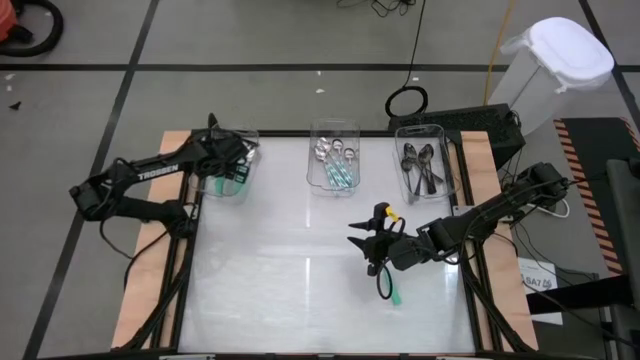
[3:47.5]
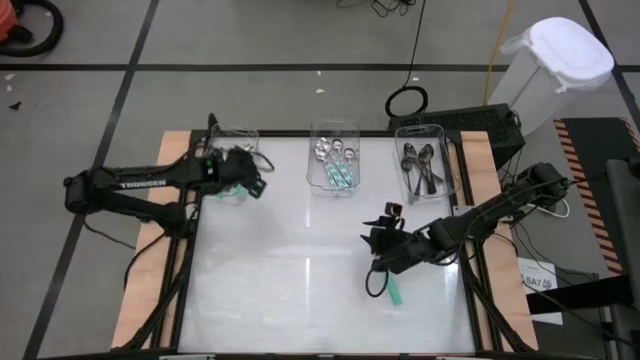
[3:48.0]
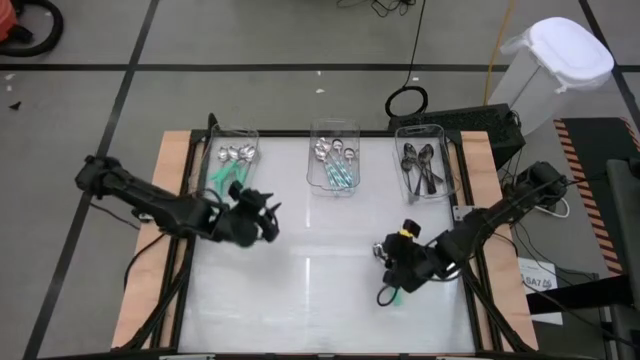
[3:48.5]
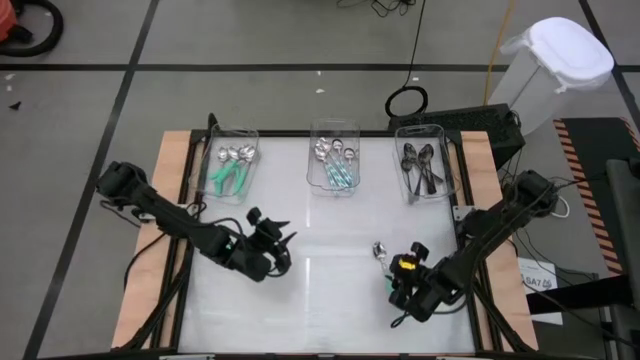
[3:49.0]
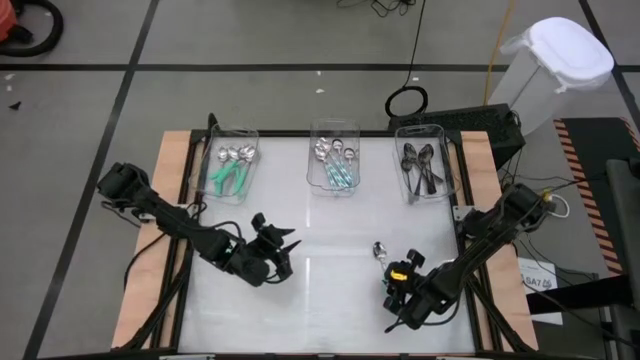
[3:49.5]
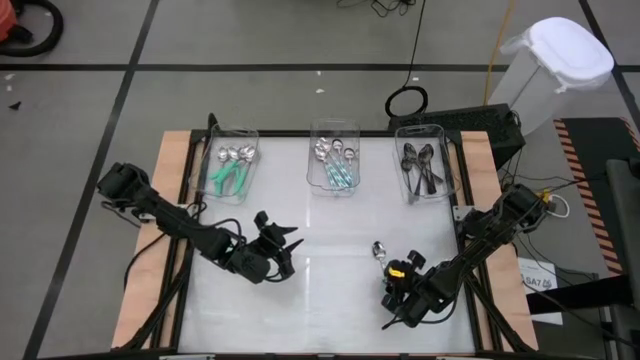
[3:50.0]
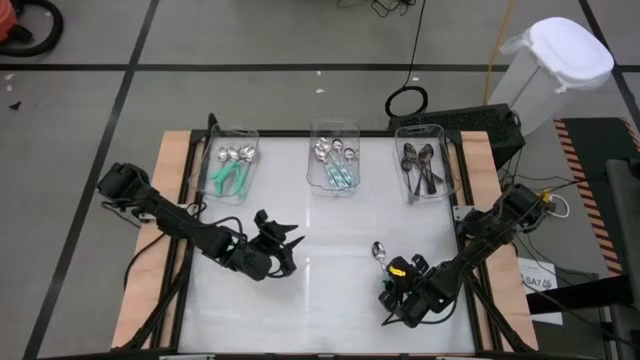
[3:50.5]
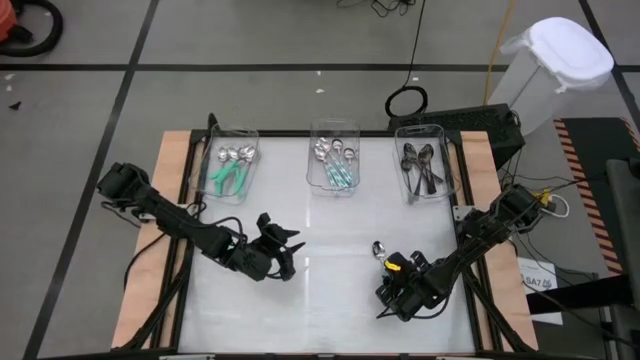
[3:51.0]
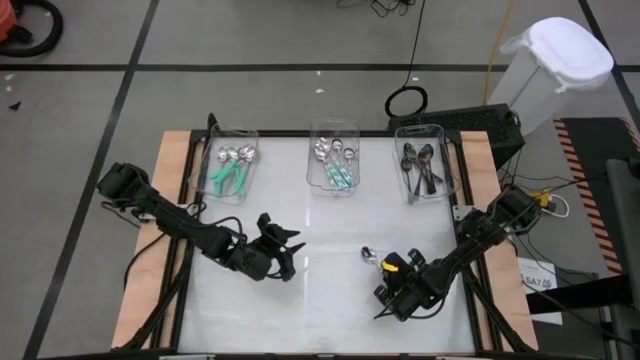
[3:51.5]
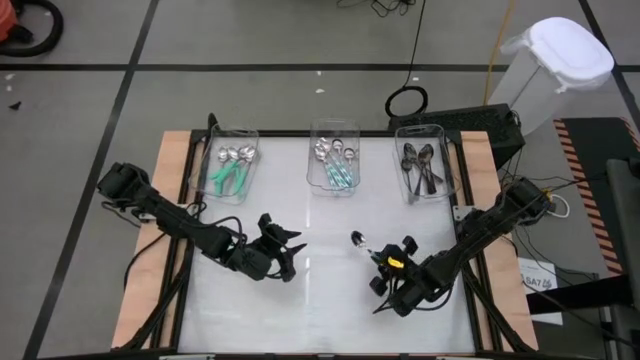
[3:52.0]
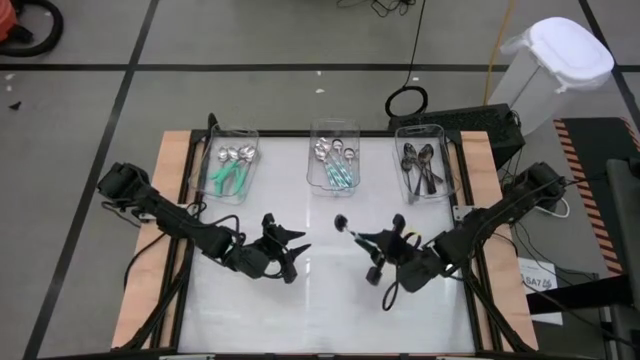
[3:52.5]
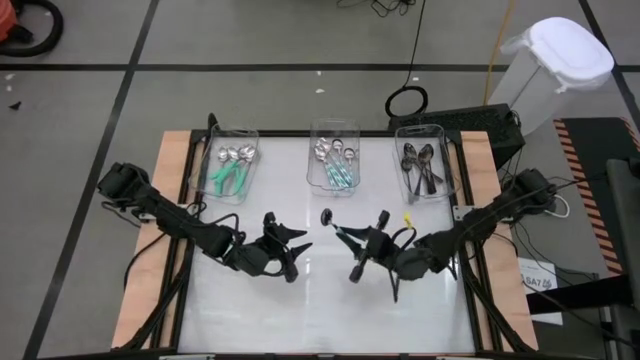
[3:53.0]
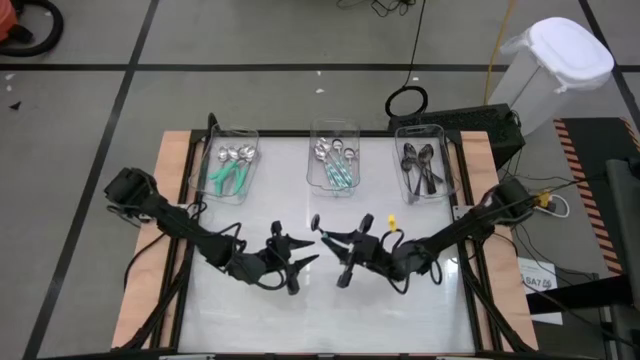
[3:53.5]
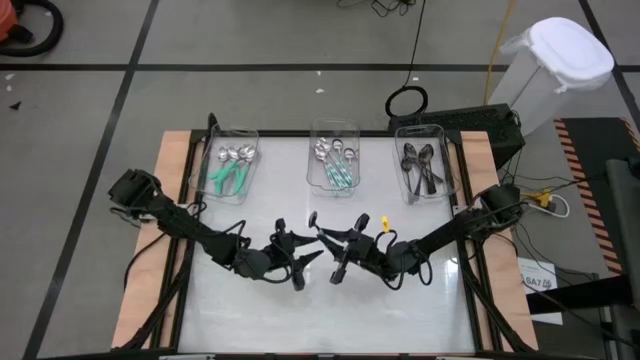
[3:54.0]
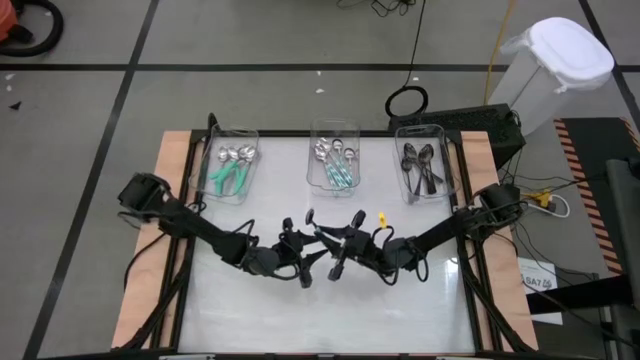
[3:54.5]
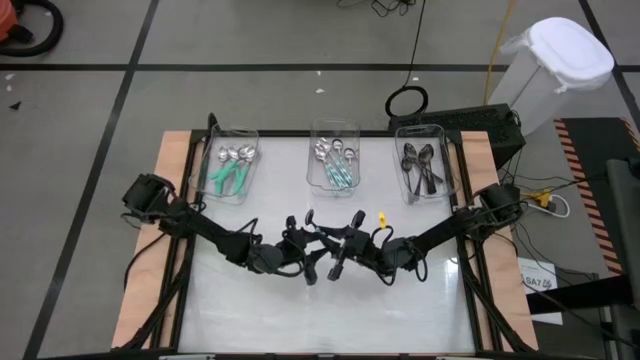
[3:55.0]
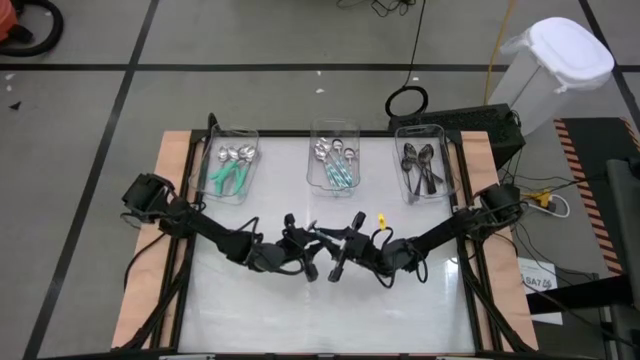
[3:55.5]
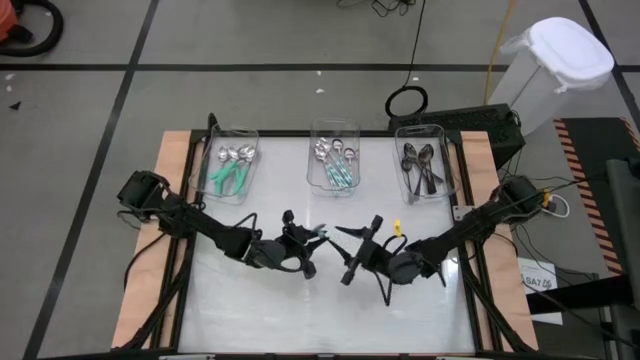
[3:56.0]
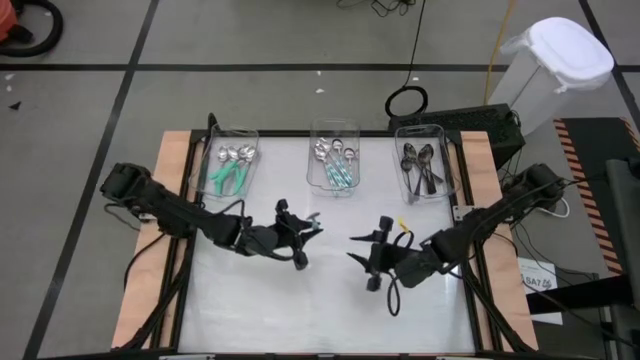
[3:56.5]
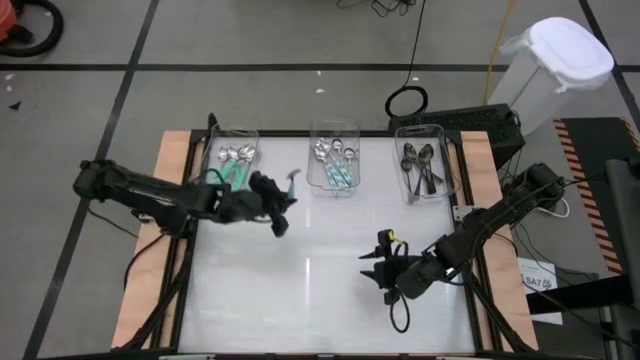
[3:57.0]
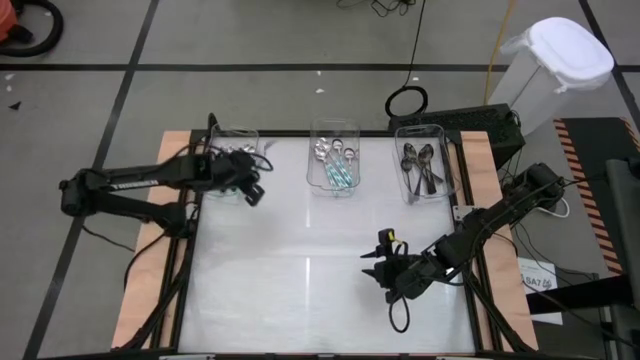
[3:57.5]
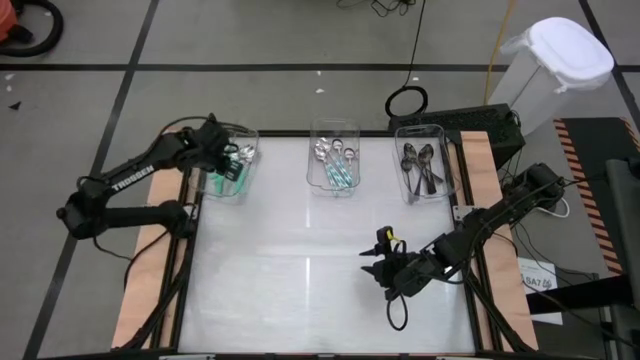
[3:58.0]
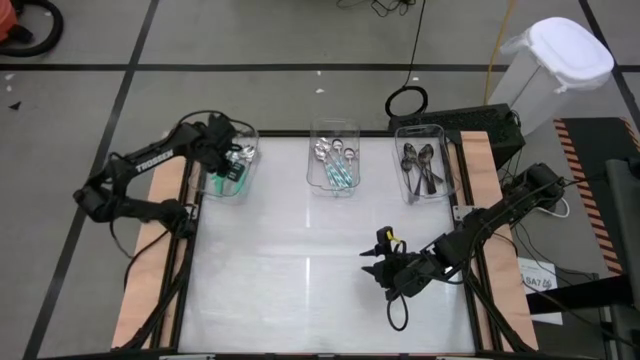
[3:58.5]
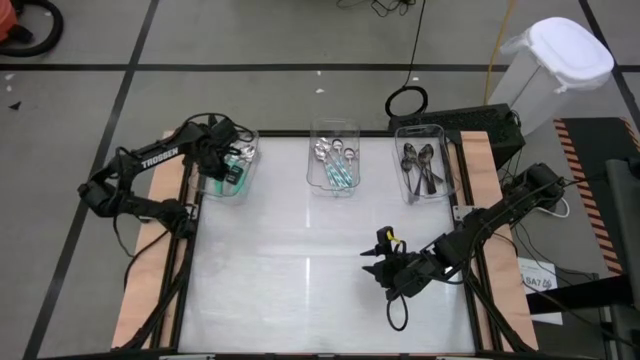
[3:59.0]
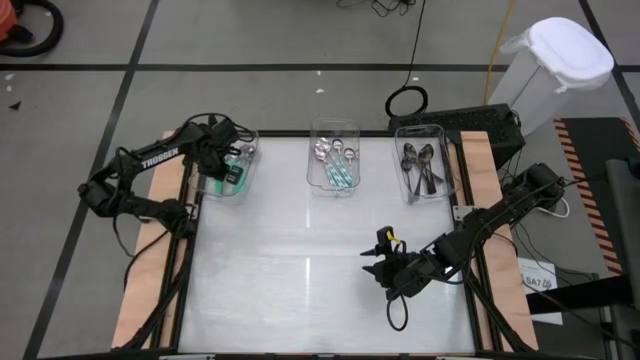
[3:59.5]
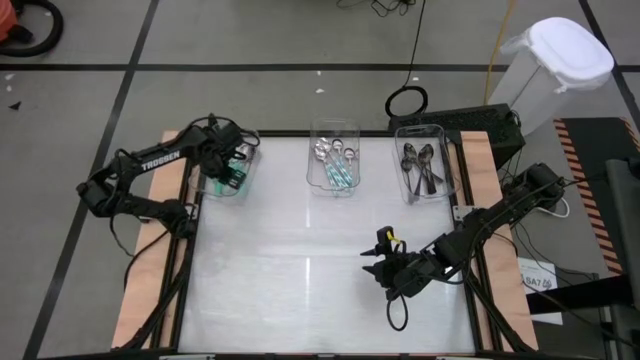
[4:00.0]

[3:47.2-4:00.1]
Task: Sort silverware by color (type)
Put the green spoon into the left transparent bin

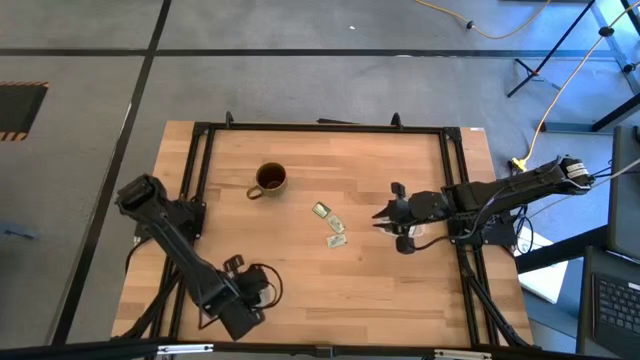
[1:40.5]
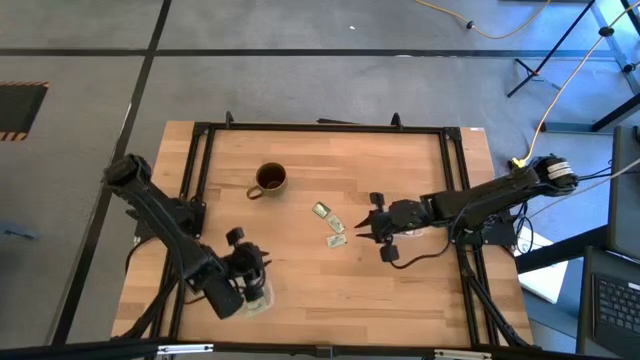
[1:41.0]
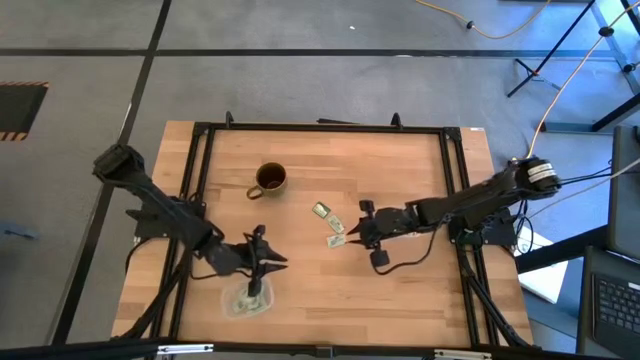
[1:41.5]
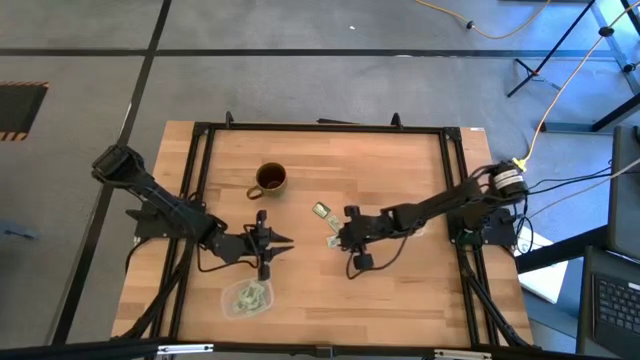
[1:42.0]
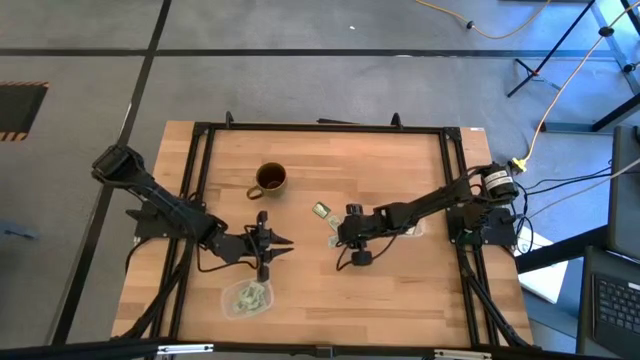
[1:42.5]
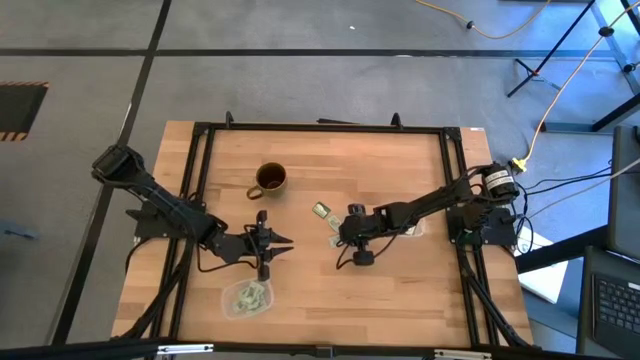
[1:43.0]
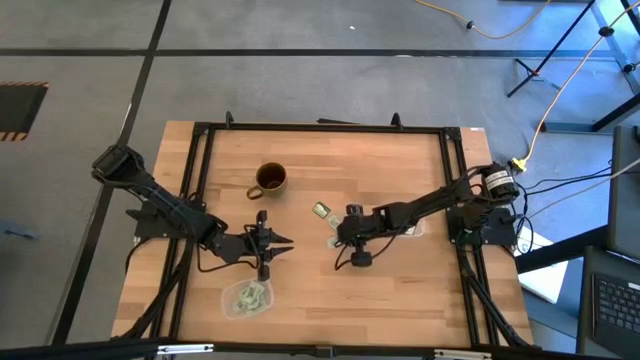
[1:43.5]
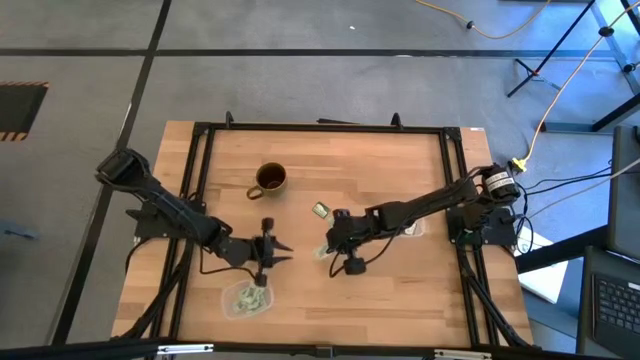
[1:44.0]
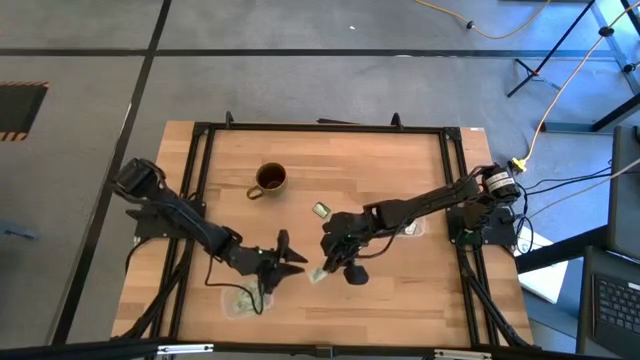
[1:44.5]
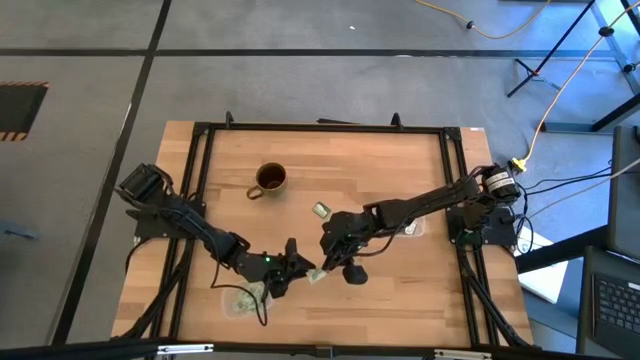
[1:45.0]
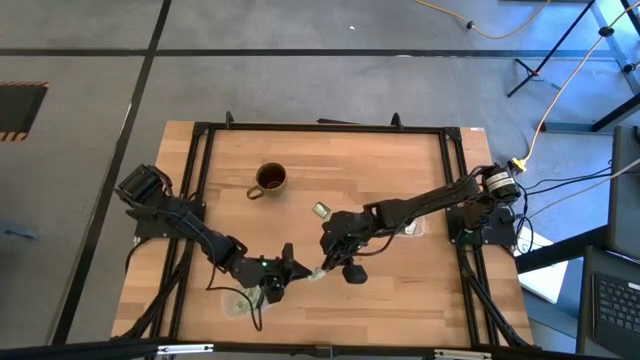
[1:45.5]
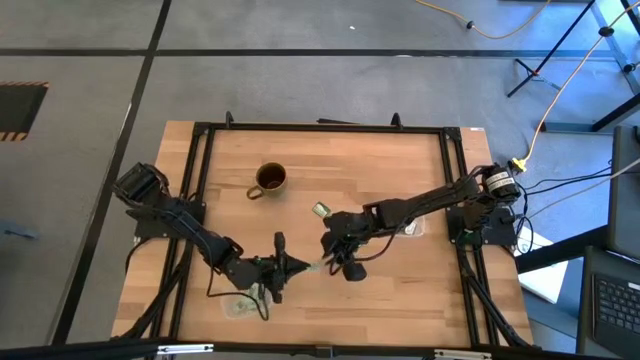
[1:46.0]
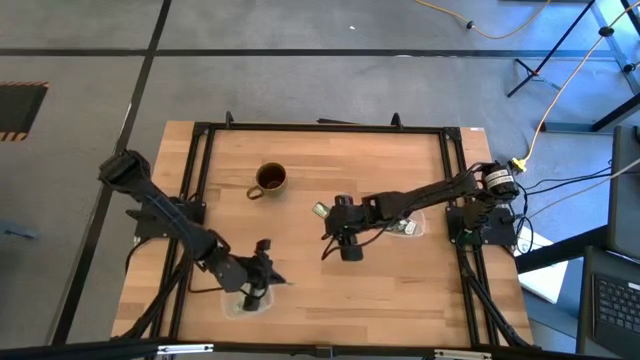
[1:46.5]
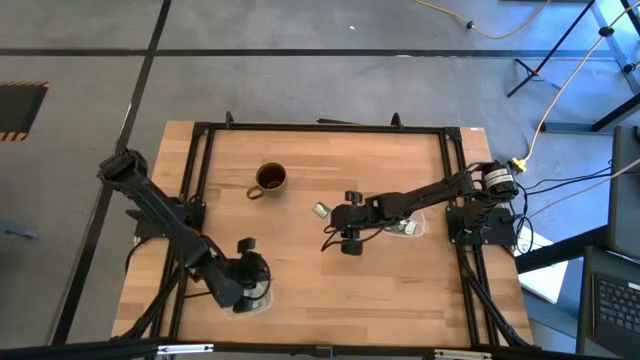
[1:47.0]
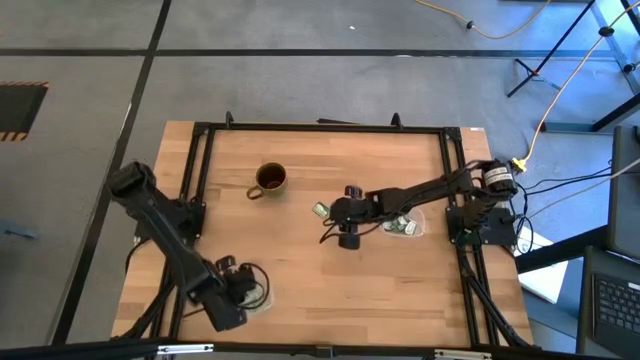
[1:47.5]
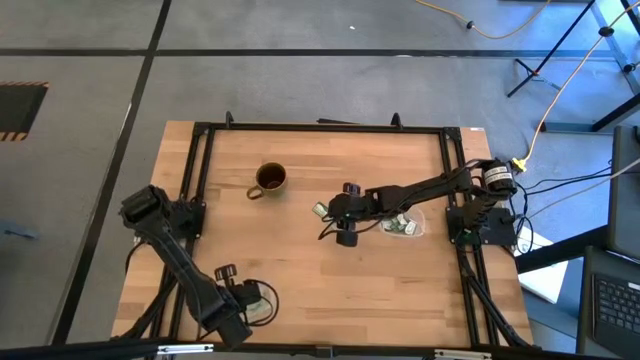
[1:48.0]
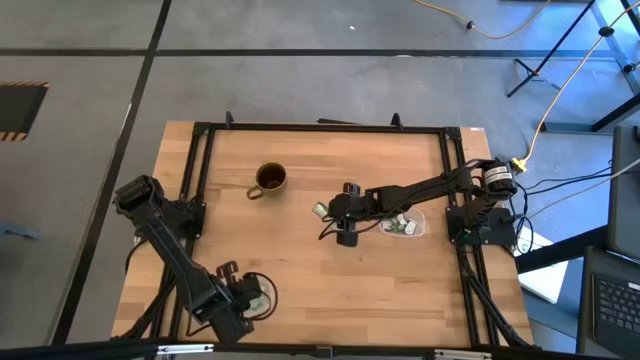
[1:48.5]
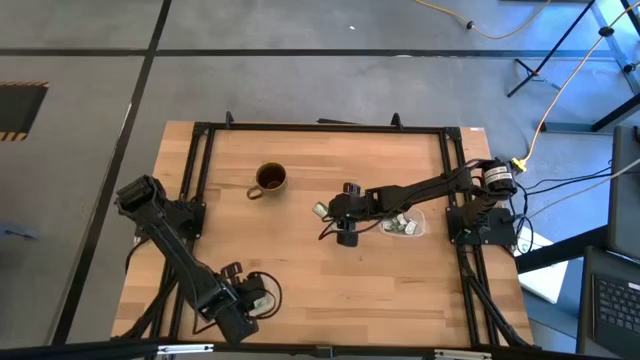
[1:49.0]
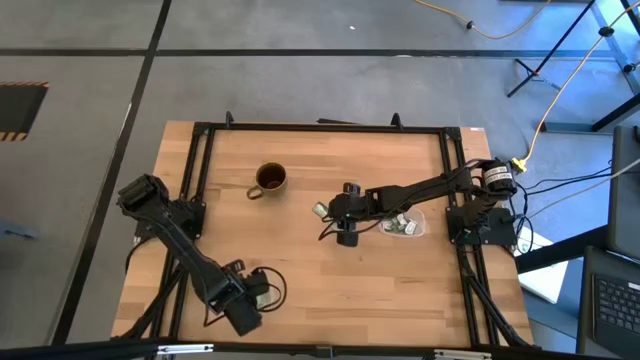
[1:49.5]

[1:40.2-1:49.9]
Task: Pick and place Stevia / Truvia into bins
Put the stevia packet into the bottom transparent container
